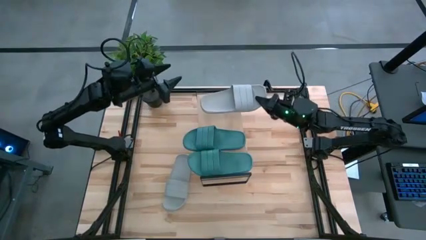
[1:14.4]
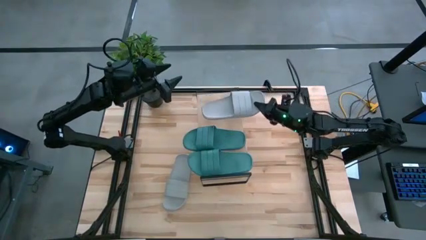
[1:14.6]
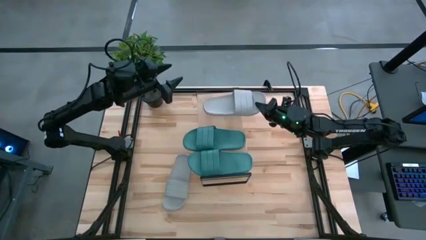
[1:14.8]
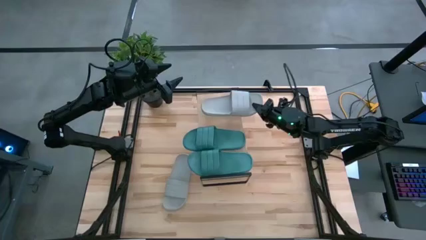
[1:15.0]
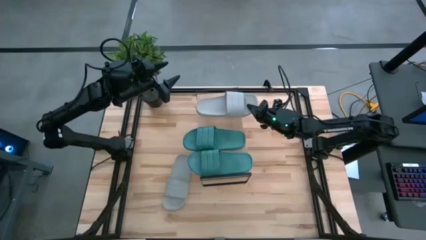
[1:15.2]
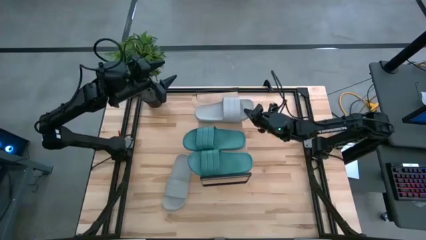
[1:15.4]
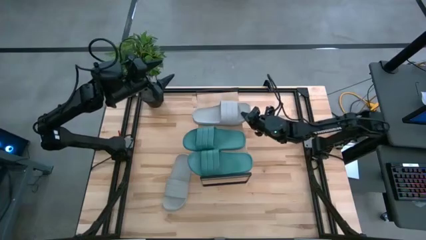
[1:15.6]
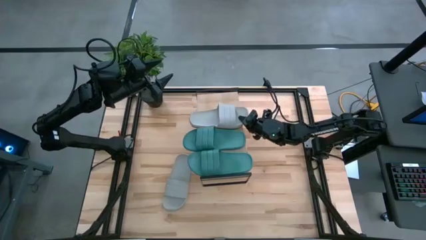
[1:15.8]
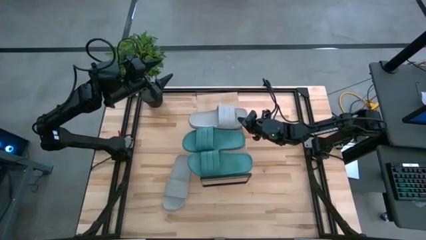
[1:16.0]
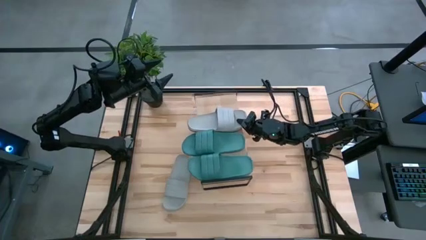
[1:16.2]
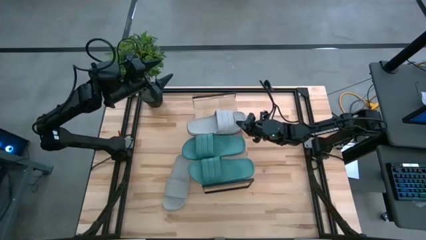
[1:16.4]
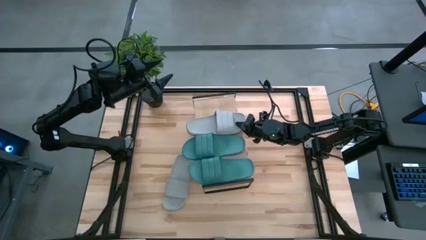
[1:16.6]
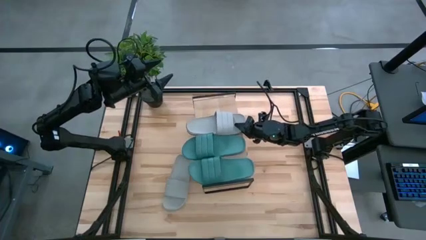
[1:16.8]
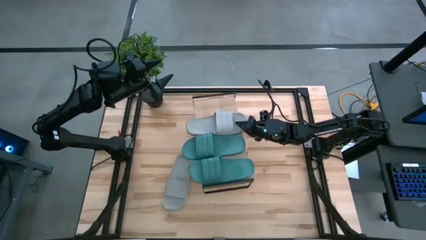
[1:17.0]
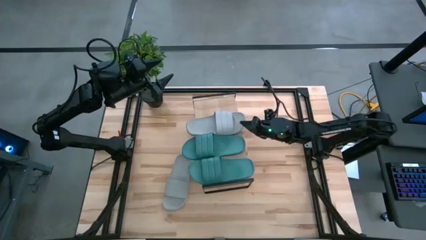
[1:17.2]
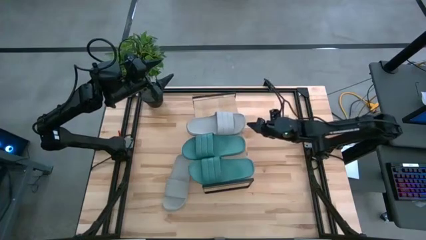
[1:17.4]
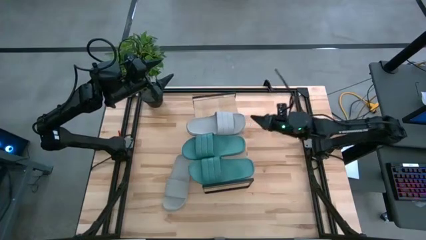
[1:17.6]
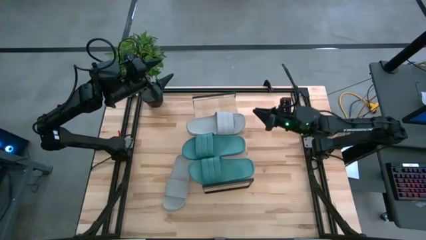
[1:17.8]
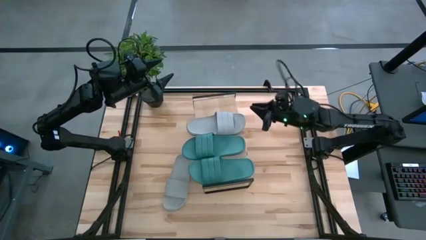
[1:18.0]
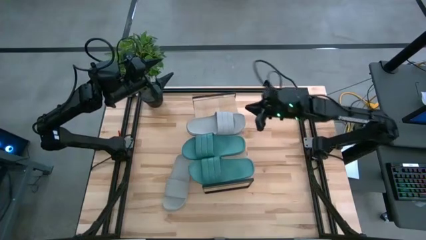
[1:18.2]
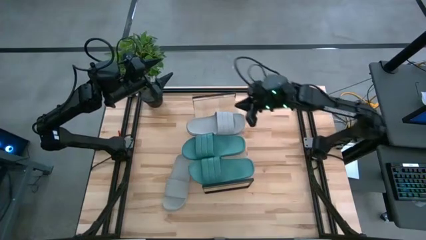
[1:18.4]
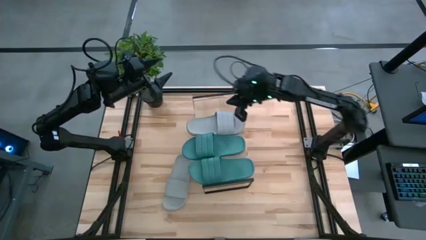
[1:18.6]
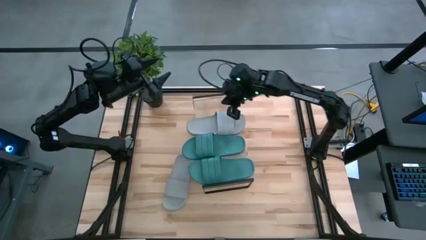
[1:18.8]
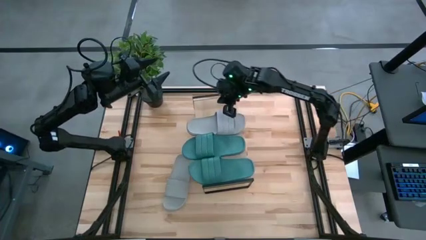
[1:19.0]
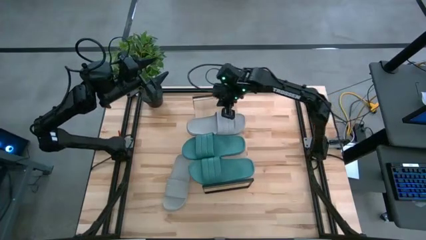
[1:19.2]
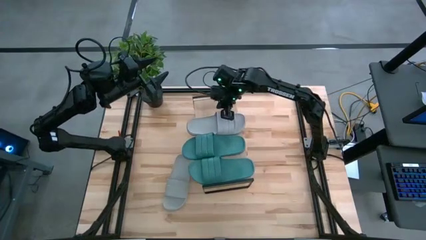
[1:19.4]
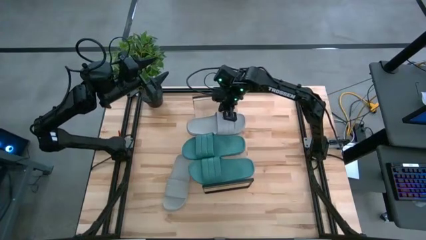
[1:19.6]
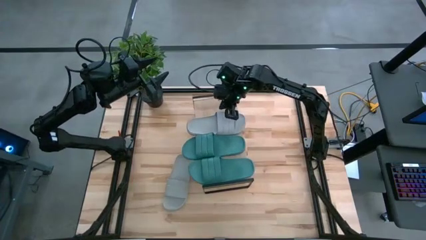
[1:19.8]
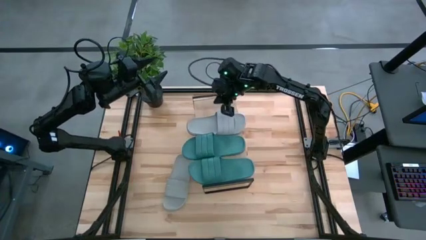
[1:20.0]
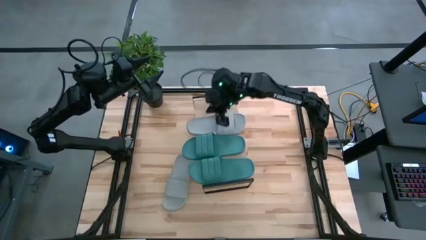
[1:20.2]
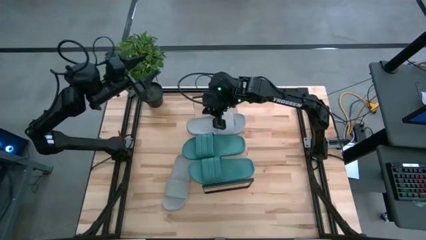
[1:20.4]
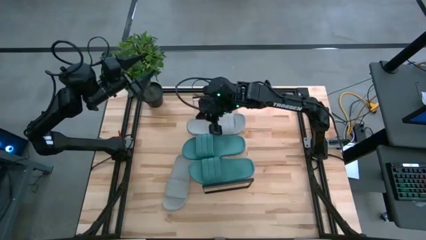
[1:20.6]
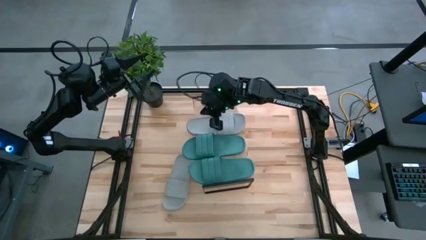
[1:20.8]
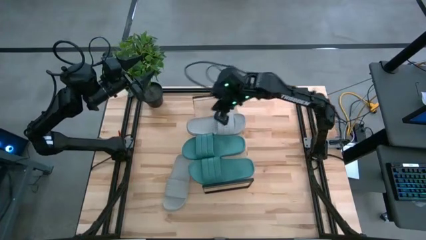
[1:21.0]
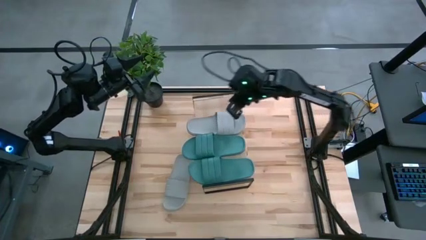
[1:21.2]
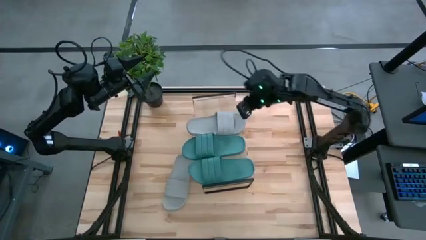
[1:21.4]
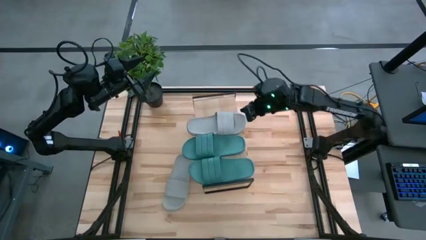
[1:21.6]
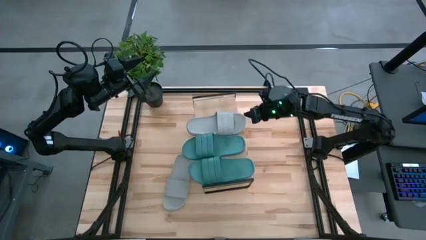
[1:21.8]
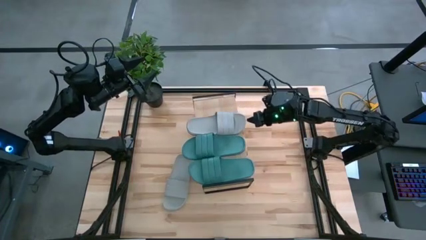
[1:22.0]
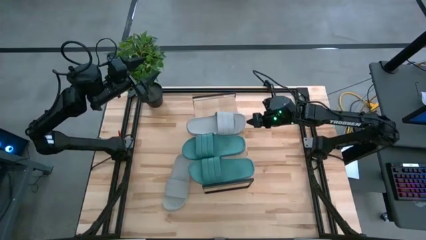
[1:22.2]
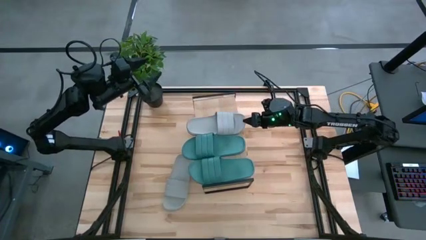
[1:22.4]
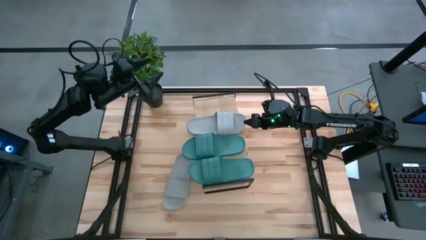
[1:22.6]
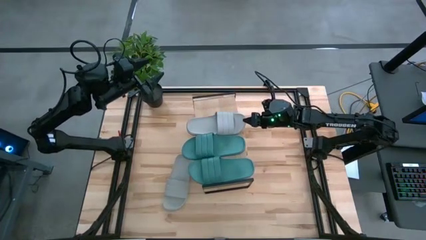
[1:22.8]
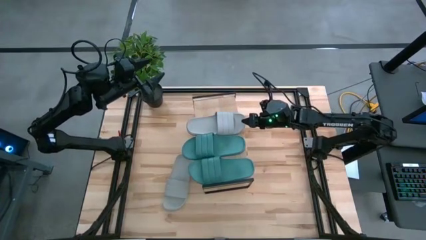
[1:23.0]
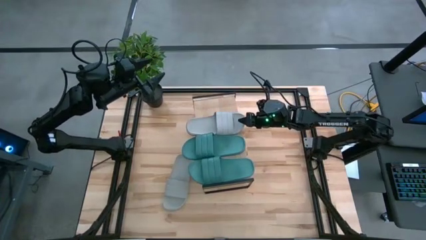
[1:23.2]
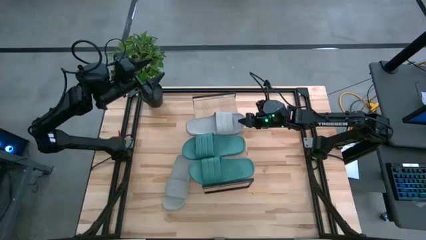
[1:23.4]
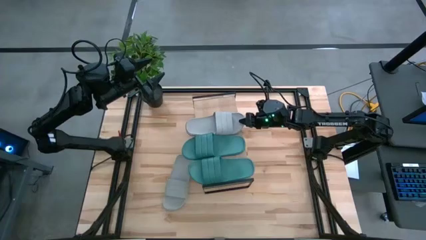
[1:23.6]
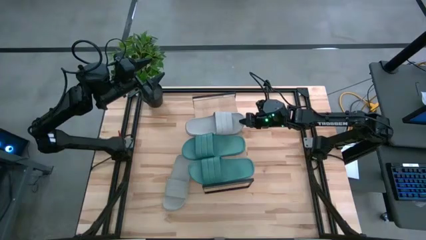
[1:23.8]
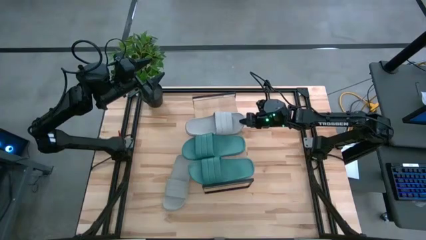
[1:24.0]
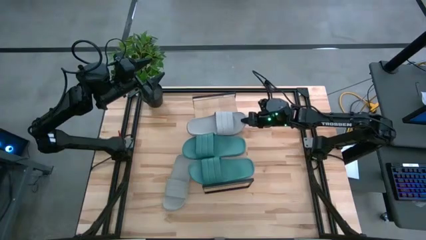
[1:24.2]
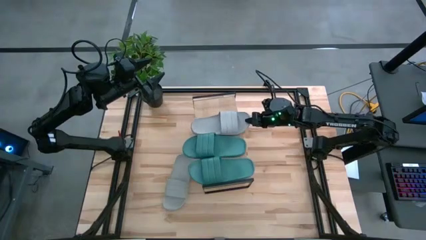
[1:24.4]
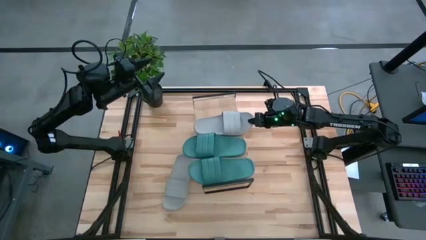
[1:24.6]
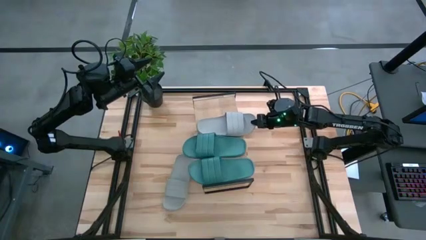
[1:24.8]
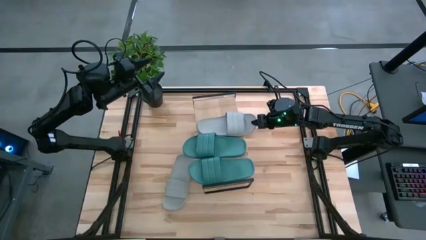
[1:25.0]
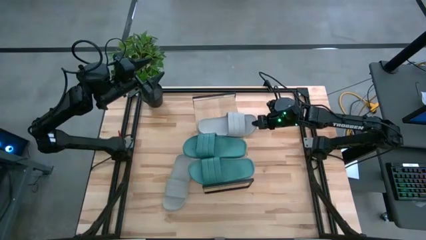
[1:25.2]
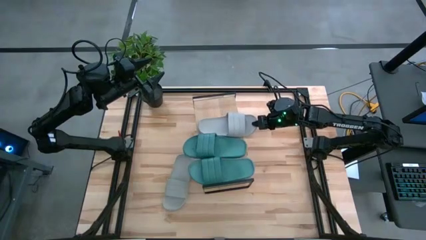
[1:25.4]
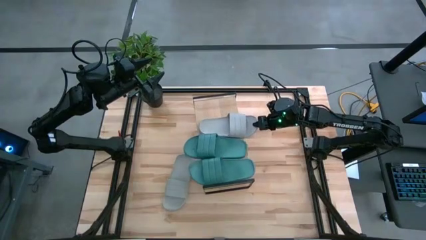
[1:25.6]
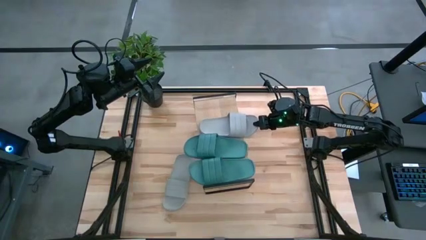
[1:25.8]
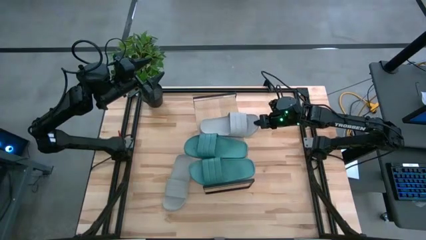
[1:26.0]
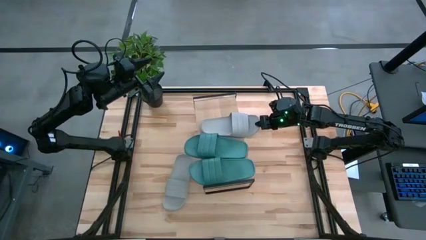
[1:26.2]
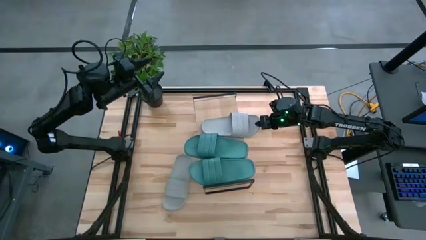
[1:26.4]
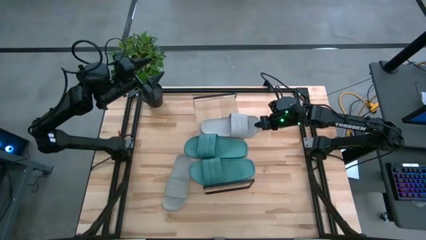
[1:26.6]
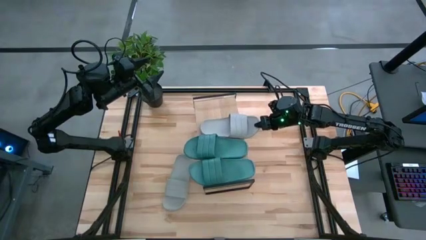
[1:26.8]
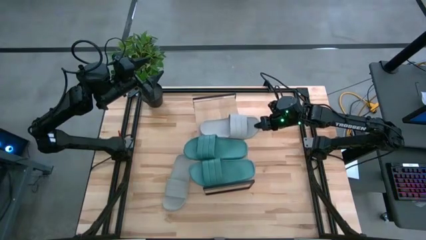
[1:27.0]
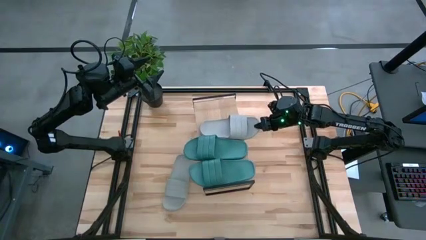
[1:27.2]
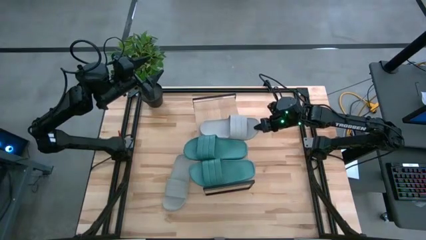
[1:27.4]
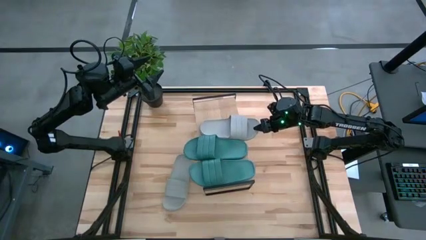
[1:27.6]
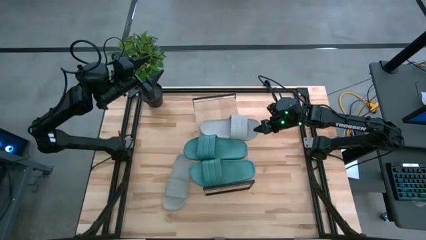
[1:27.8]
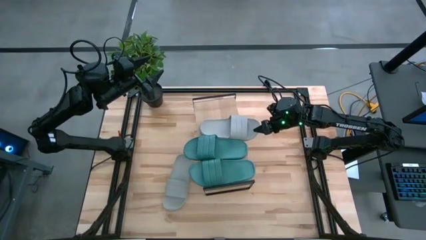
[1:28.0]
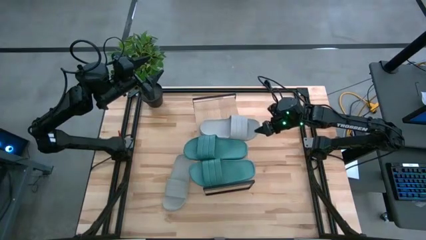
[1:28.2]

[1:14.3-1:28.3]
Task: Pick and place slides into the shelf
Put the left gray slipper on the shelf
